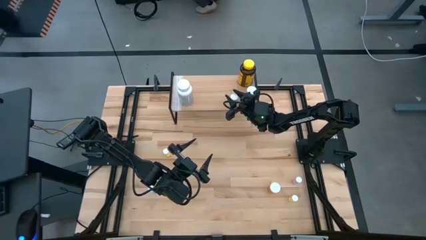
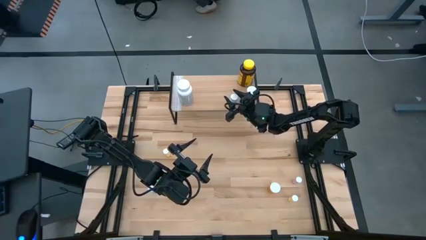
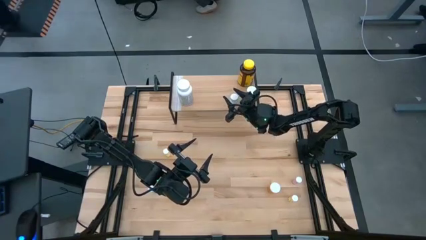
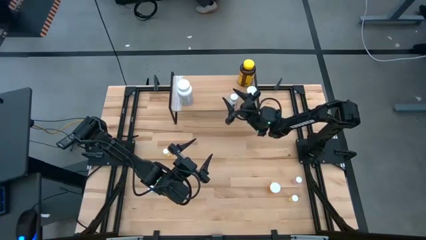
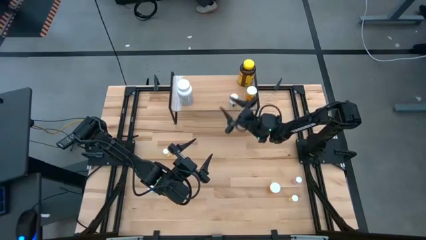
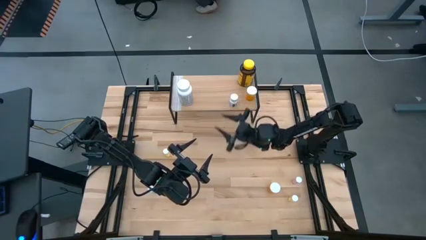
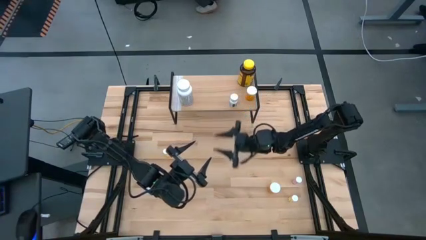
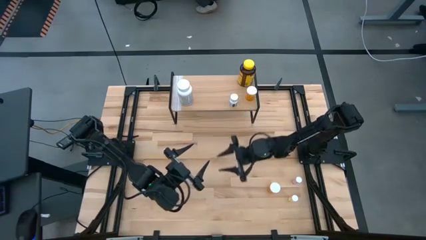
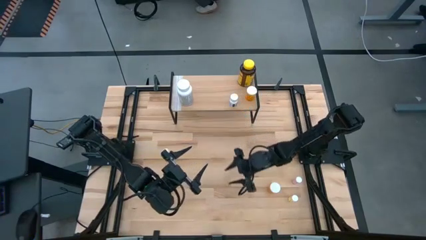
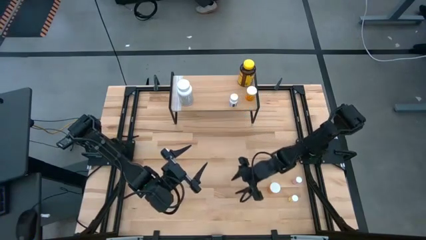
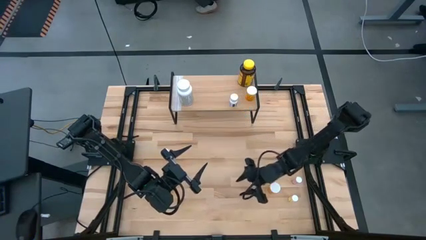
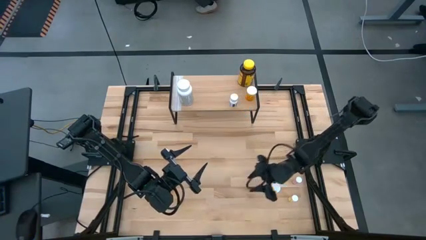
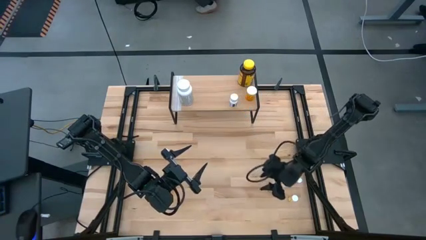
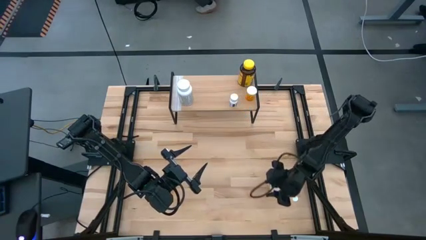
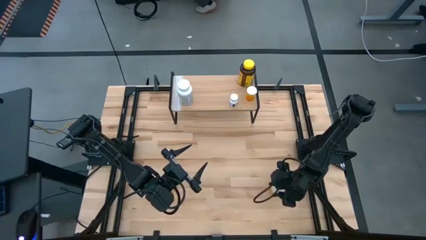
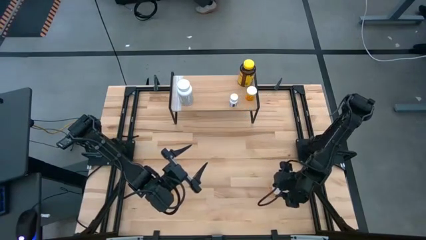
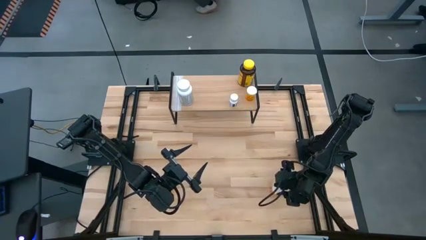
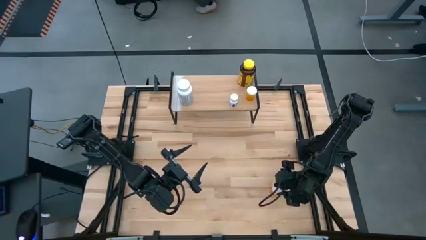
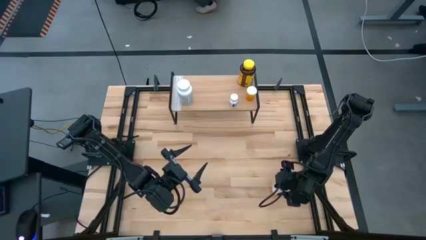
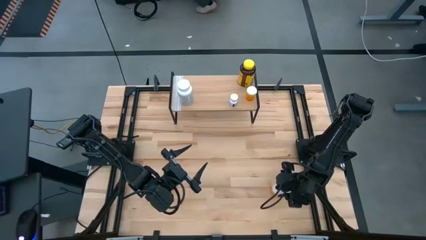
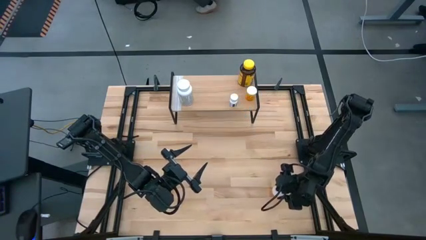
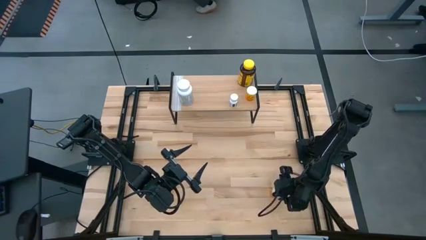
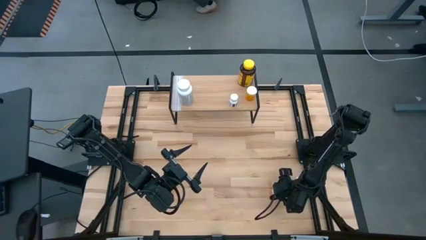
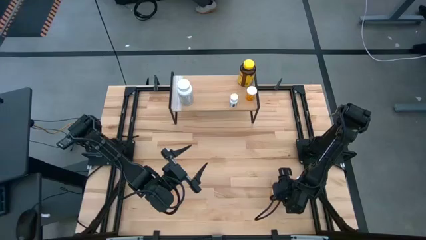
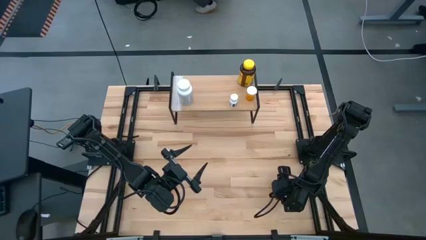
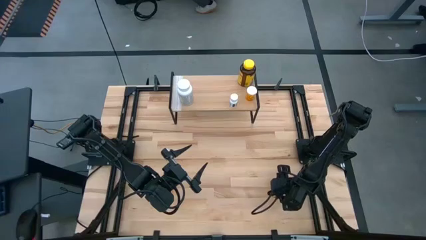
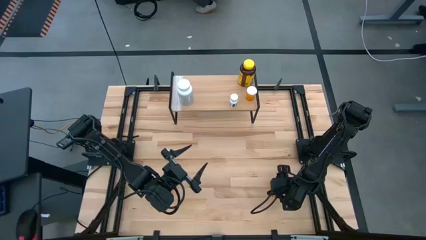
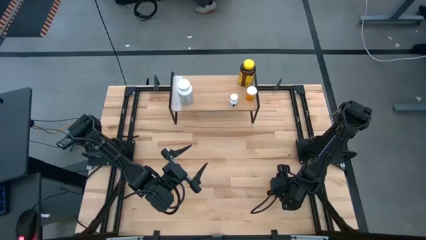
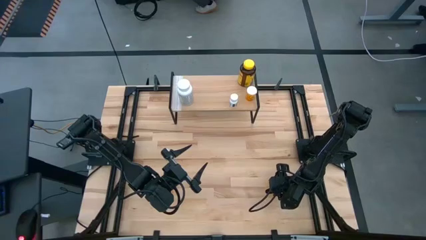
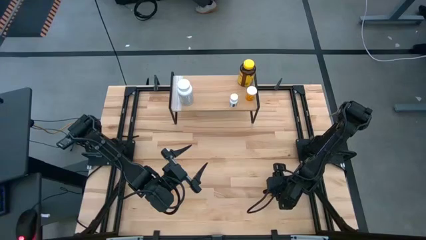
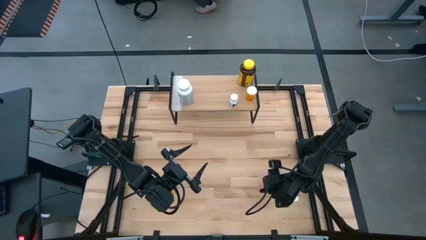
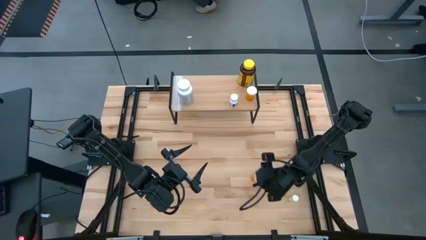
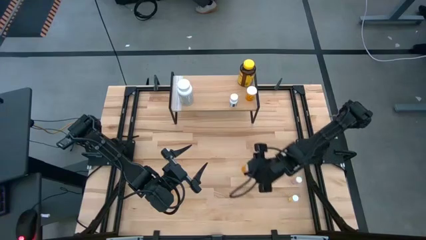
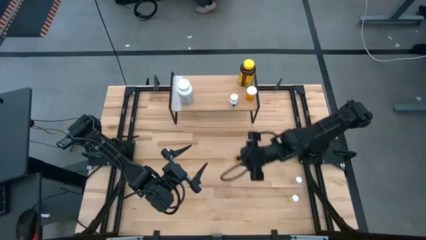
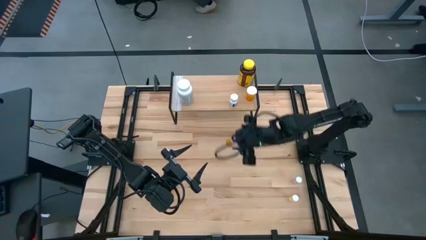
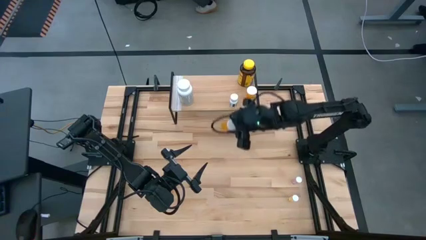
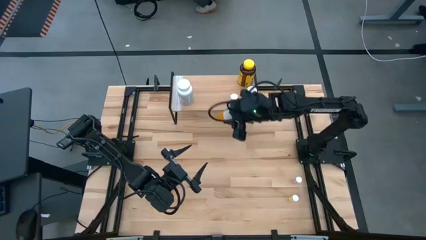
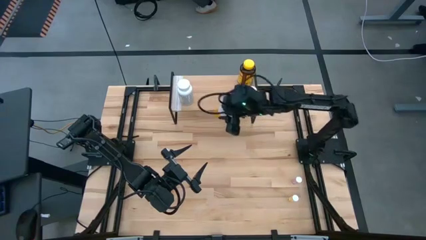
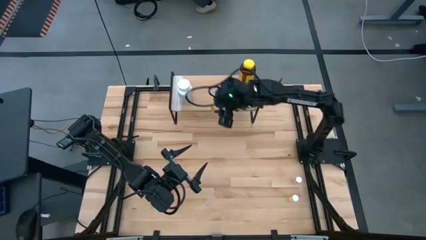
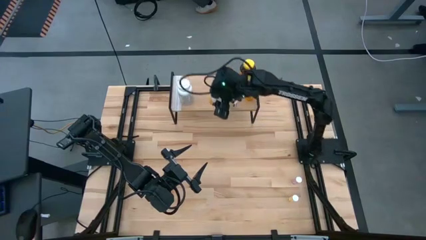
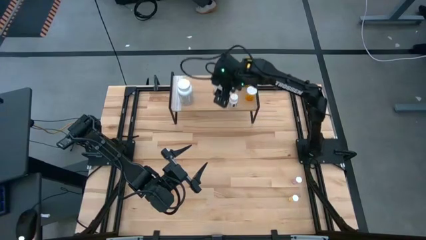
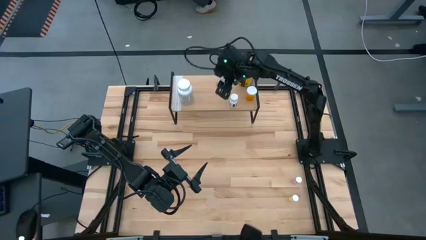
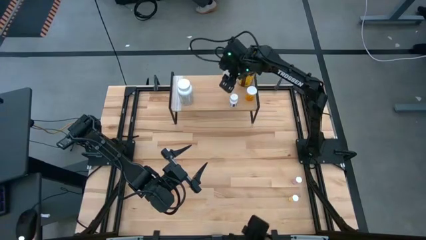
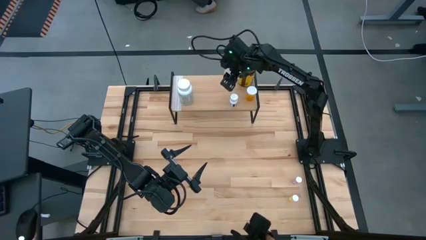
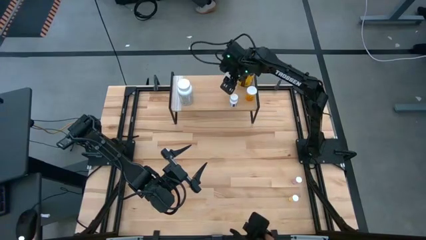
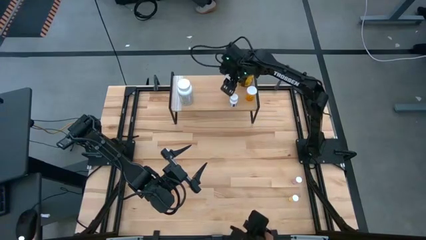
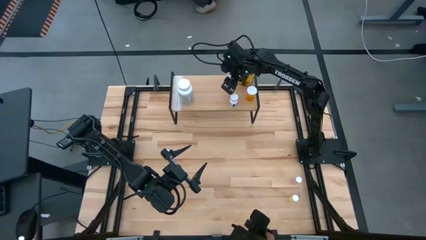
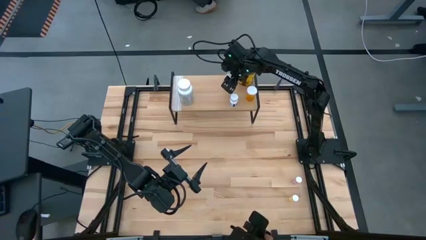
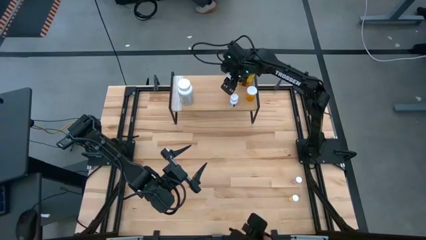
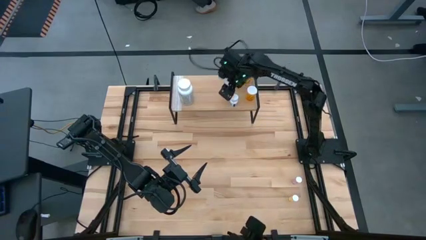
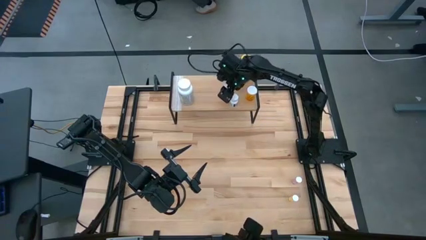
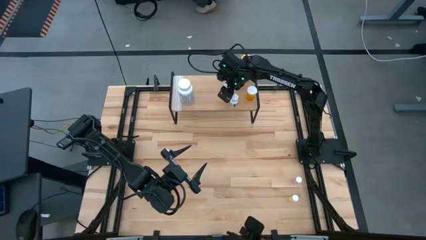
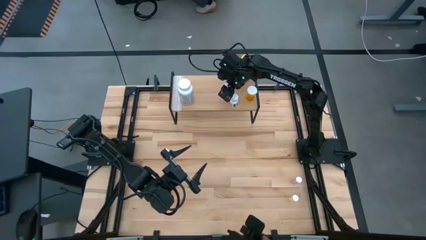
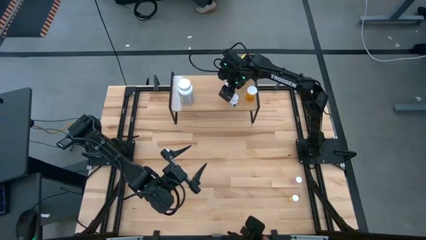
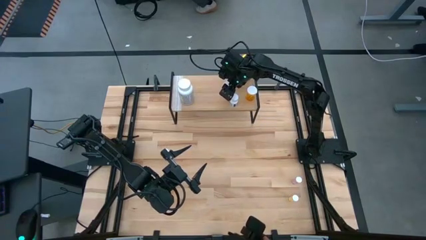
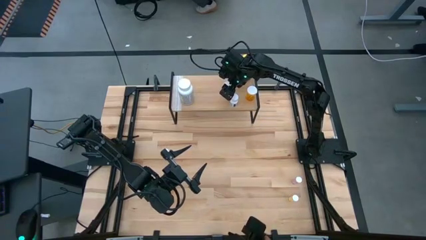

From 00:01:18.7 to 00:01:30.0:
Task: Pick and place medicine bottles onto shelf by color
Put the right small orange medicine bottle on the shelf

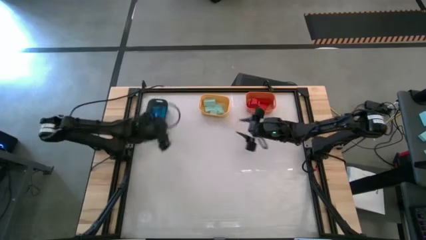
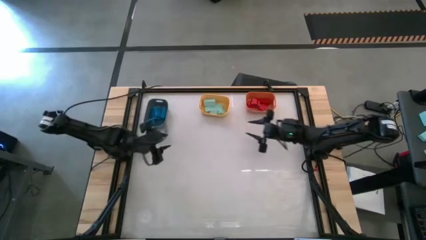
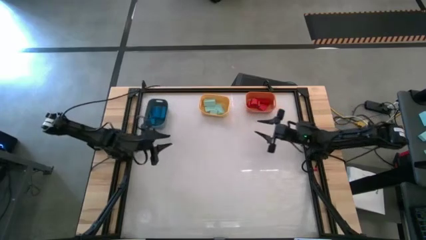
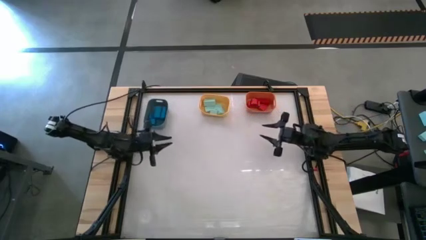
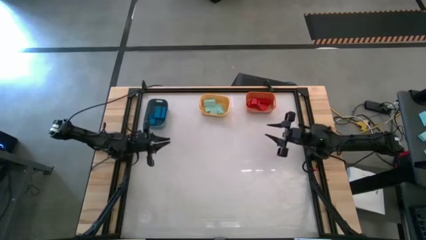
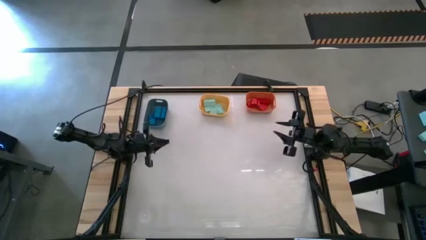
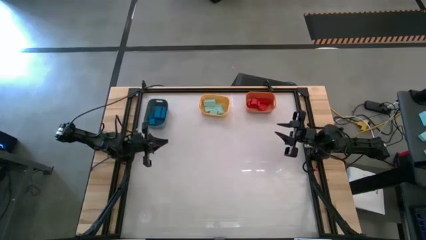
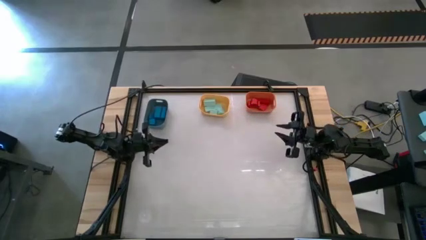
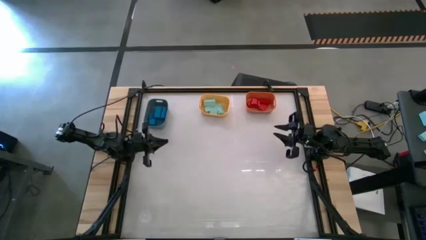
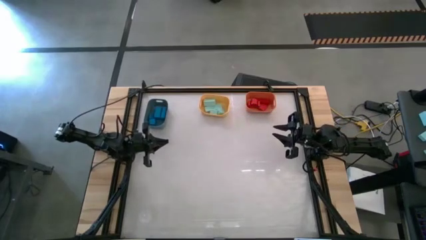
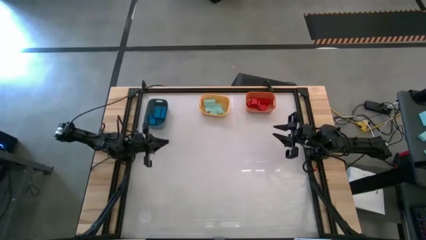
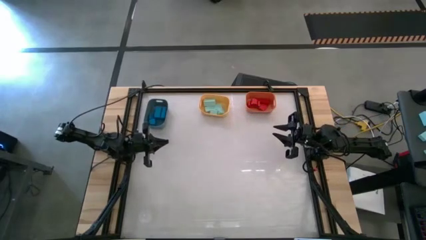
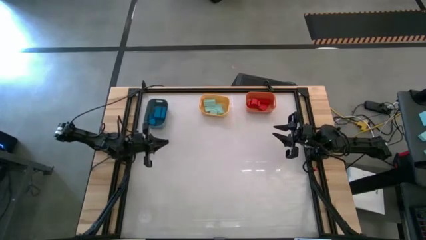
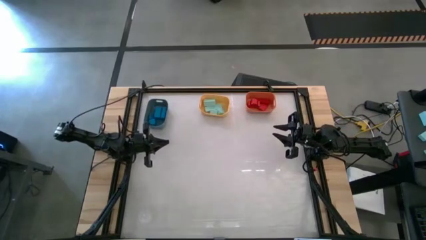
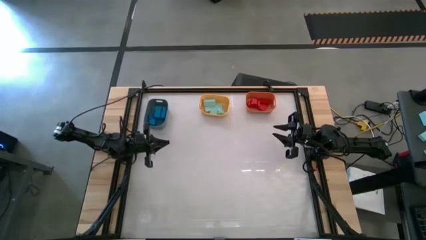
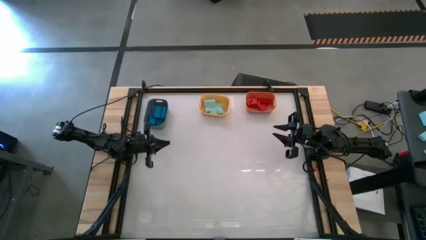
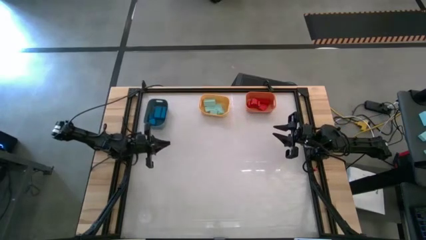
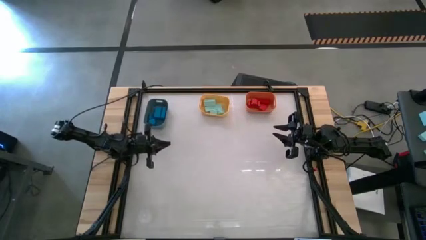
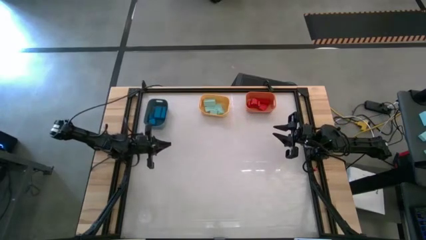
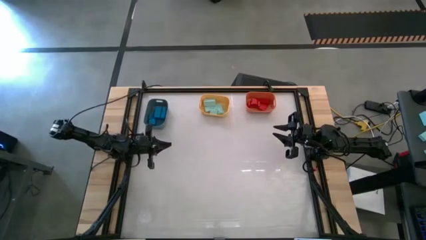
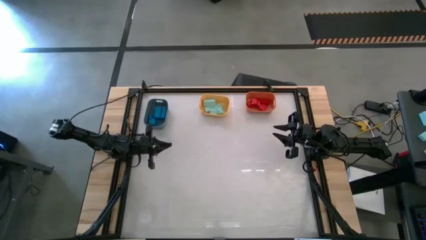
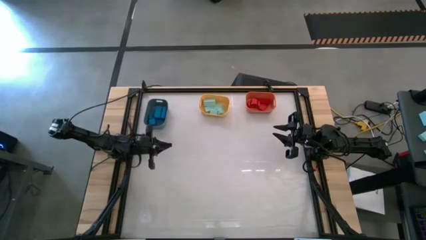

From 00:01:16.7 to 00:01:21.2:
Task: Sort & place blocks by color
Return to home position
